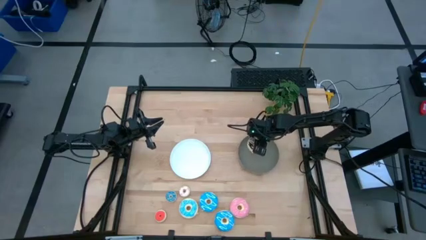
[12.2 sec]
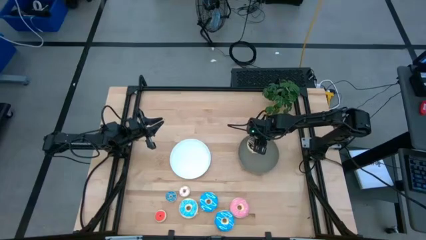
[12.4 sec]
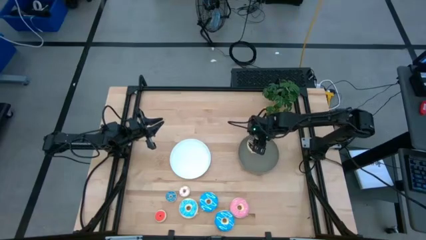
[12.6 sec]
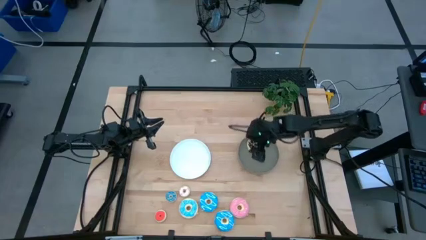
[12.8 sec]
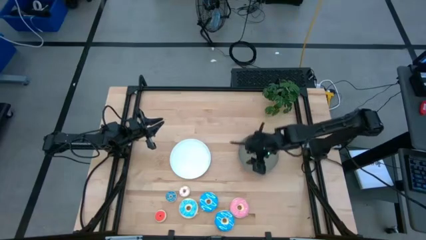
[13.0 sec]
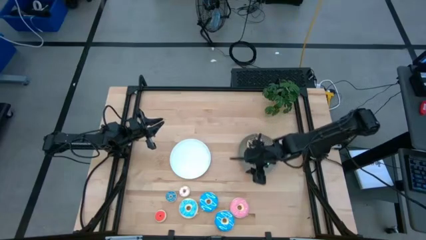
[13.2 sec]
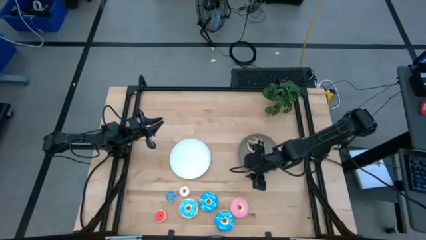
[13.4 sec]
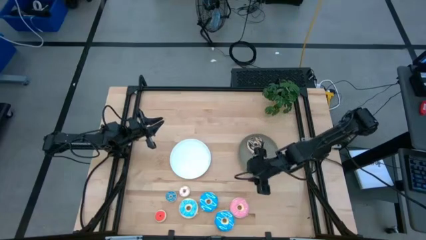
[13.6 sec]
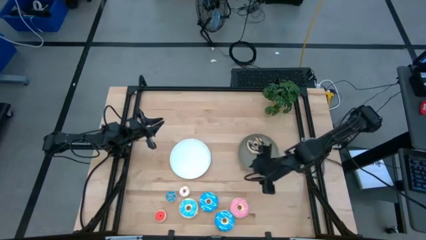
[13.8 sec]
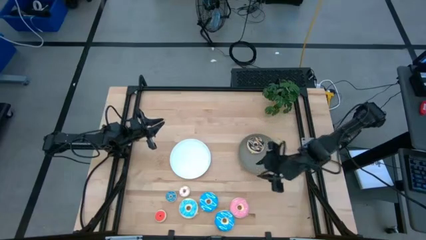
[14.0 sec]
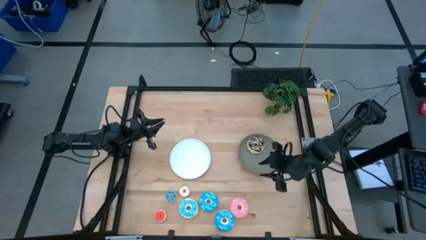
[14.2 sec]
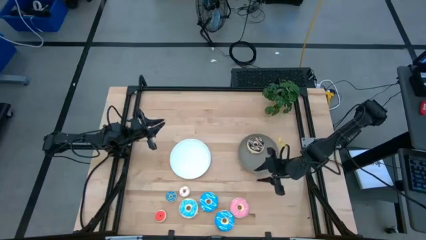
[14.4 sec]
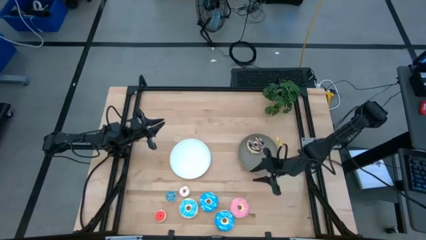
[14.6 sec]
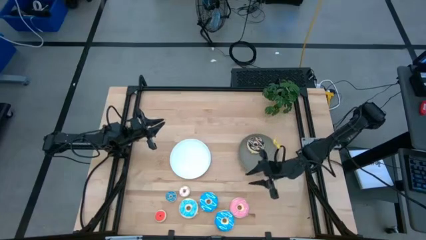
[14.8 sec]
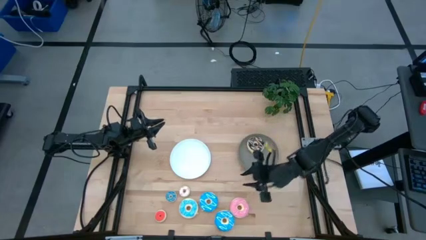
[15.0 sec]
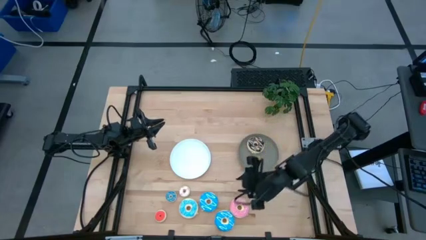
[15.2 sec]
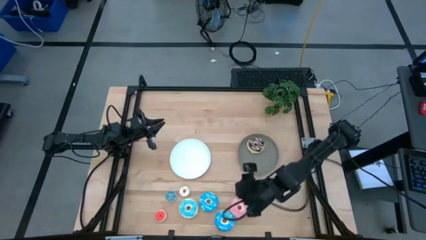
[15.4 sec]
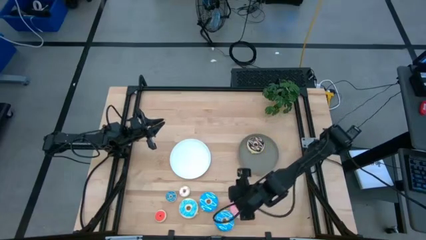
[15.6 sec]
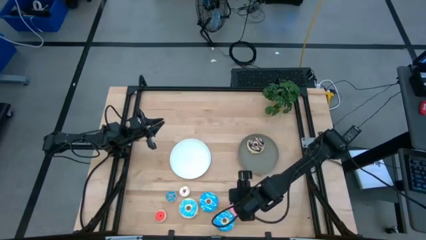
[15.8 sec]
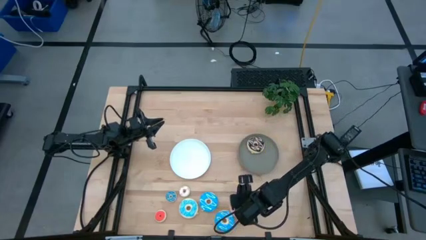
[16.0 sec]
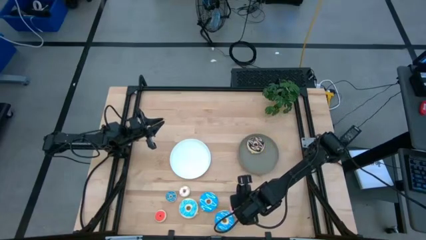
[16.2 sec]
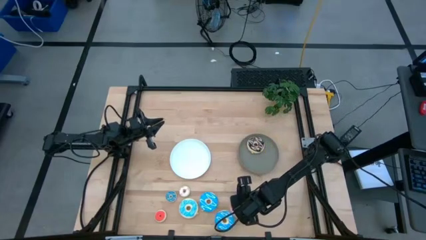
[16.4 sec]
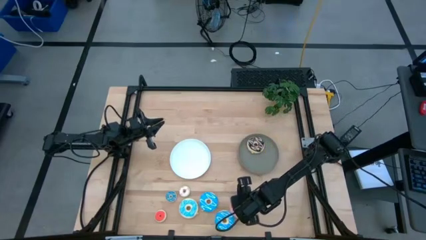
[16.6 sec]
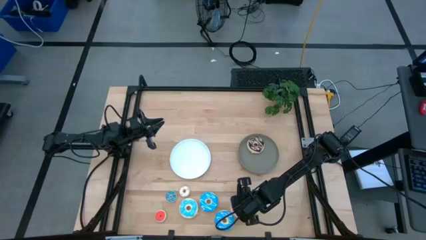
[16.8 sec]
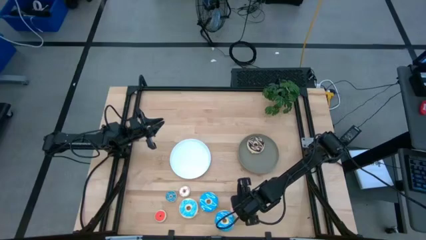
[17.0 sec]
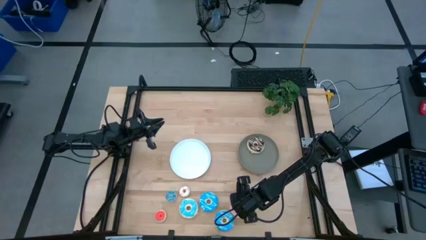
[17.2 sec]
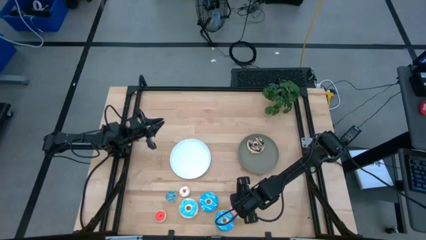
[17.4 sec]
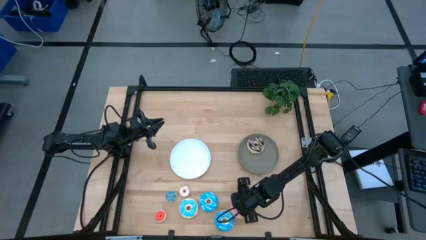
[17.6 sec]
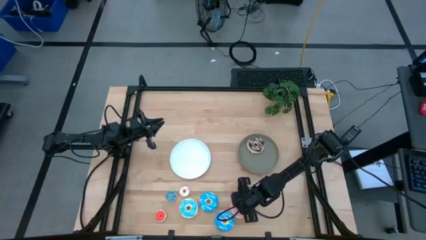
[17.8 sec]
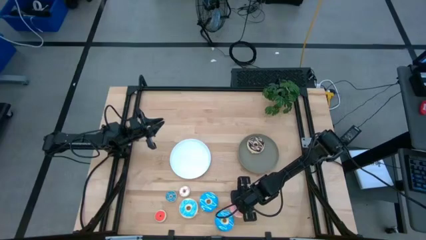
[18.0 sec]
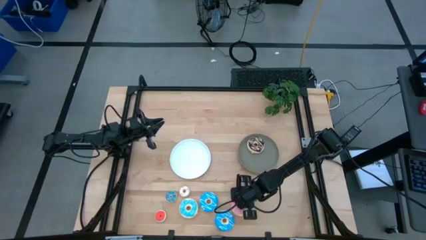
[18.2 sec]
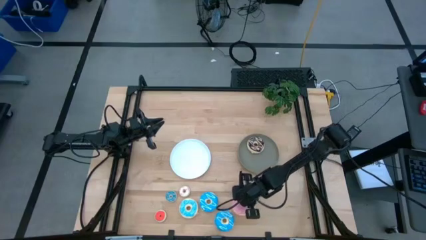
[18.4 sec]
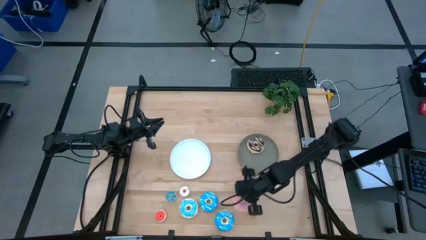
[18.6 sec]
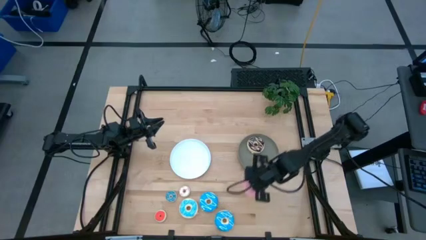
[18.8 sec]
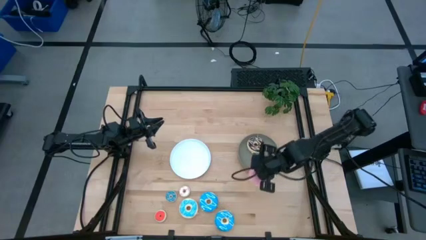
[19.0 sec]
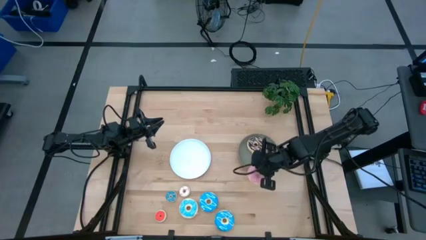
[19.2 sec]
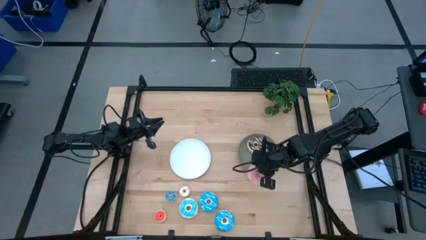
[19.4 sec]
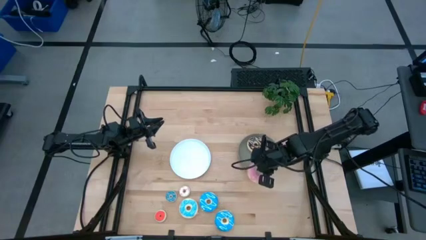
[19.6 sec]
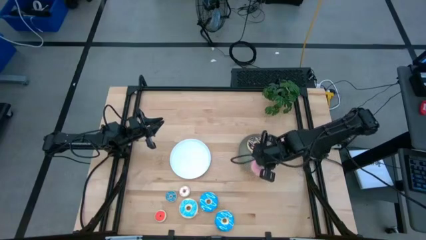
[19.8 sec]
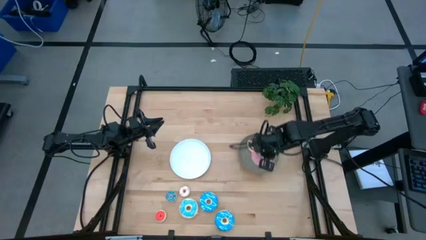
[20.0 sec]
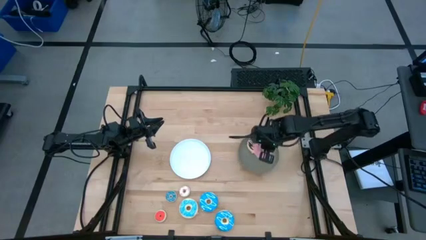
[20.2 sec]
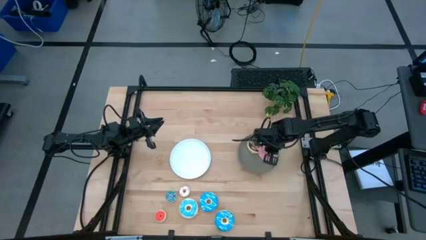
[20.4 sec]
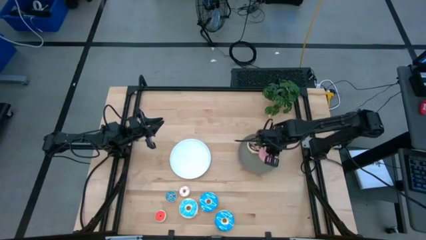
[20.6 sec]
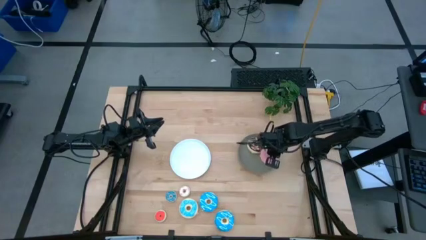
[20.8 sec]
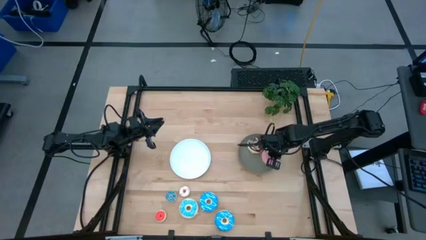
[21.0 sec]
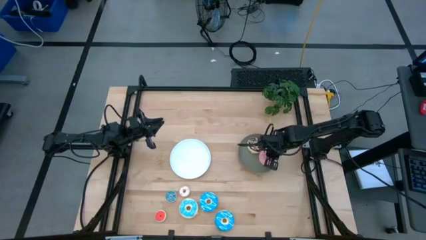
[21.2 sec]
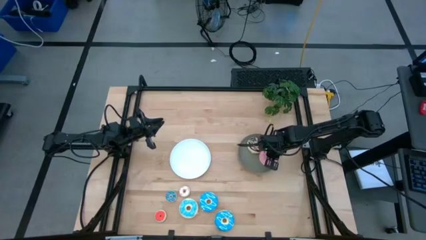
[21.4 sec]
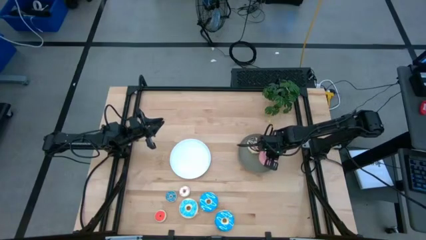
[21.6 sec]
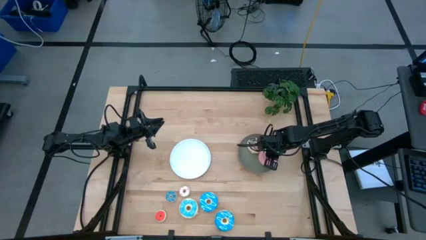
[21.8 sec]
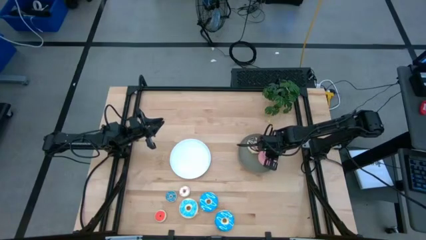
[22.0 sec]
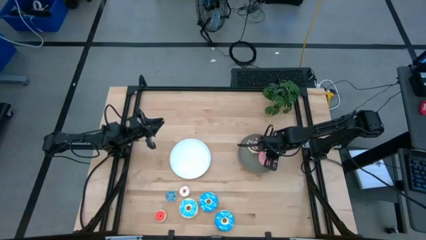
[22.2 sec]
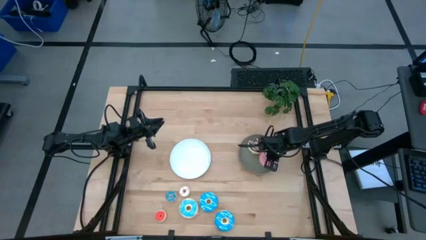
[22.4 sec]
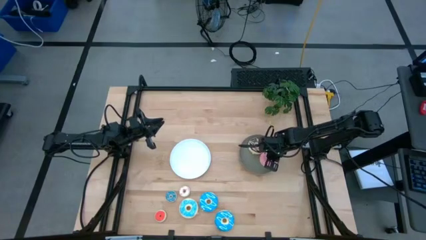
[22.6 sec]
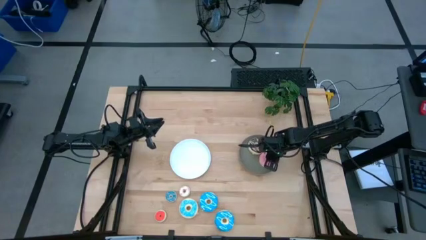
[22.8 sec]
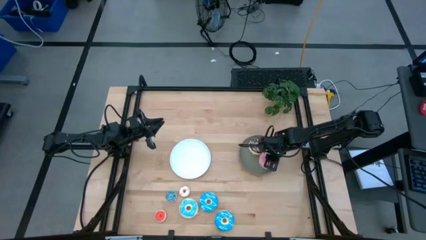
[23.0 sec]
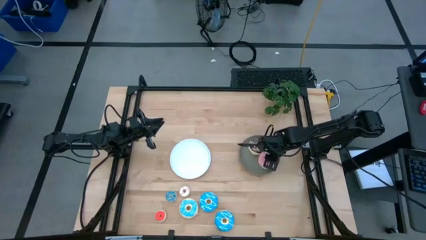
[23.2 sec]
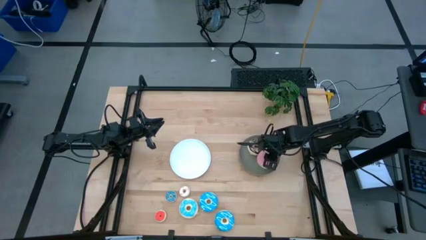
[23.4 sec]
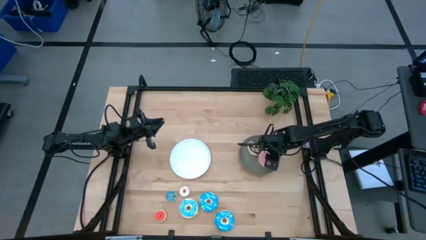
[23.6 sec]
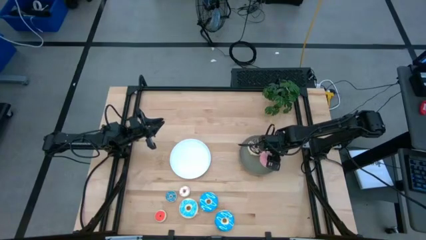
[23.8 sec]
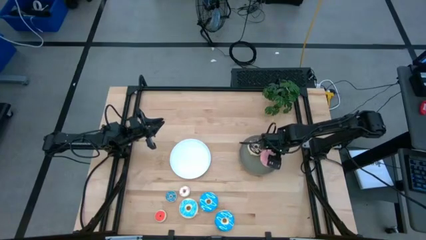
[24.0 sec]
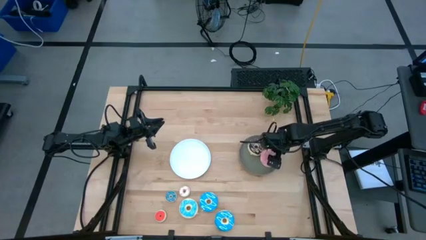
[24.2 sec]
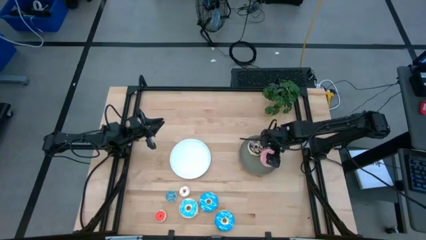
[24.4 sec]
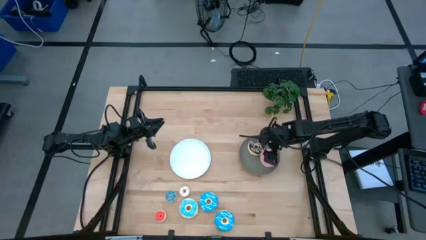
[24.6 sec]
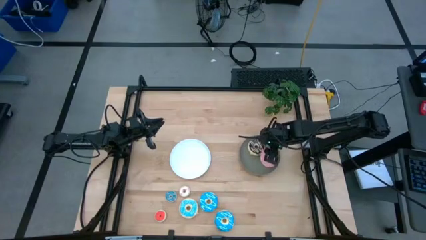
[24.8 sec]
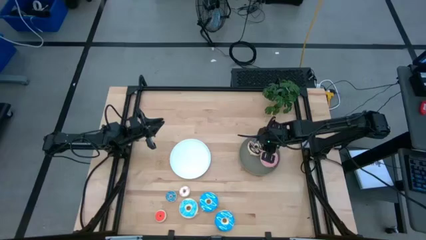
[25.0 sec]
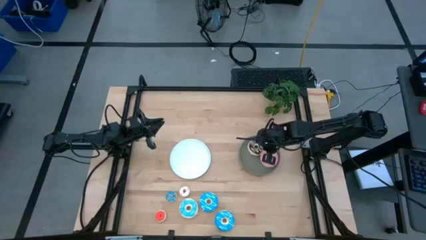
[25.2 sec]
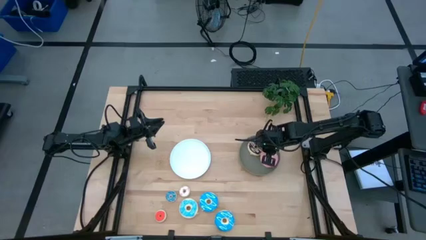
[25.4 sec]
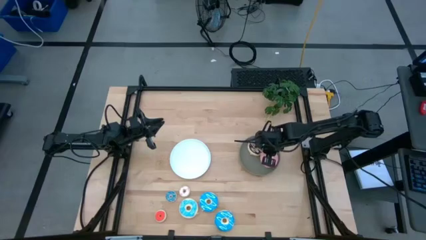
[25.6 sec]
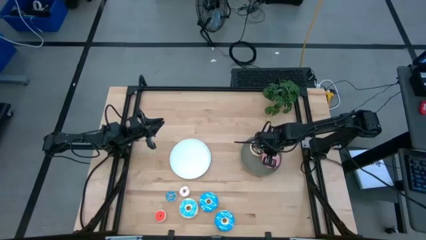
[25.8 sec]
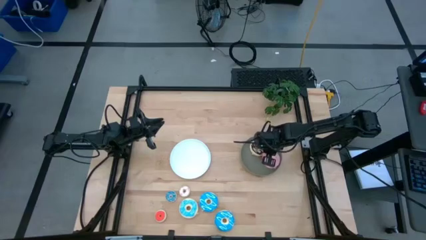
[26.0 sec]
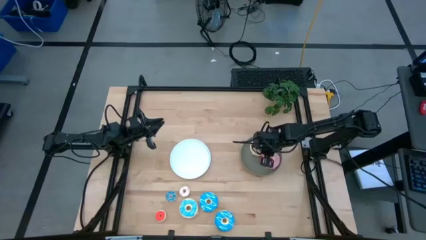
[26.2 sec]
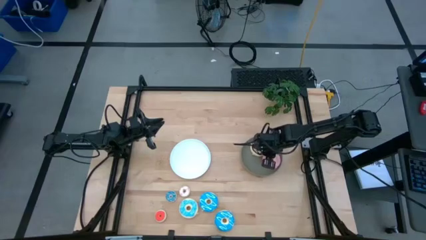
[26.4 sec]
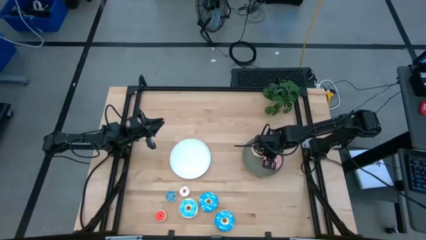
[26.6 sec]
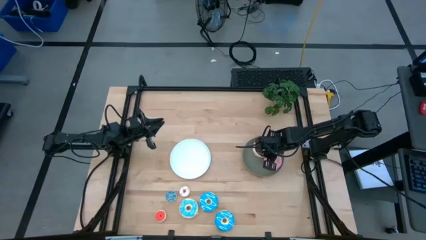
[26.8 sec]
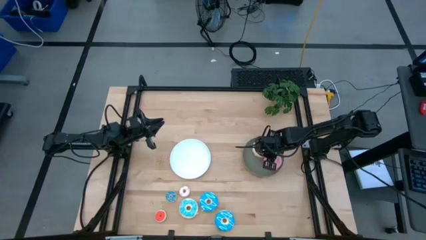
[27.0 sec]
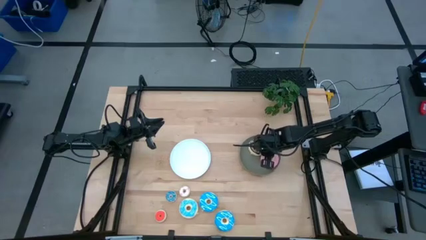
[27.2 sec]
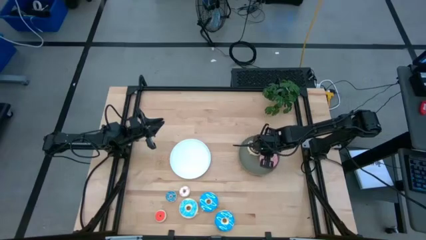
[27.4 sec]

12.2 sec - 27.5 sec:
Task: Pick & Place donuts
Put the large pink donut on the gray plate

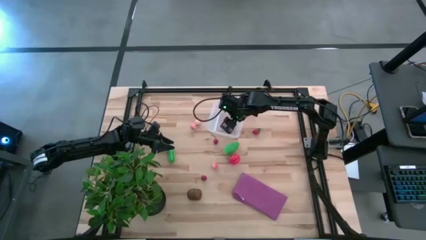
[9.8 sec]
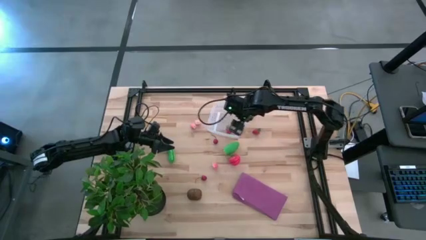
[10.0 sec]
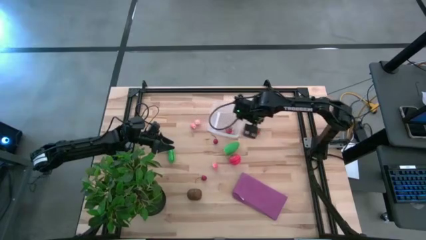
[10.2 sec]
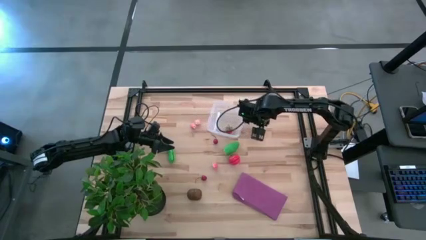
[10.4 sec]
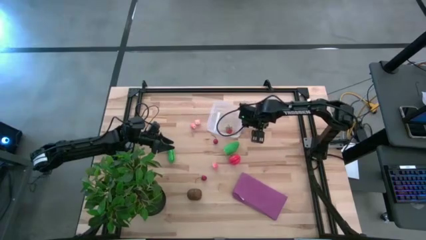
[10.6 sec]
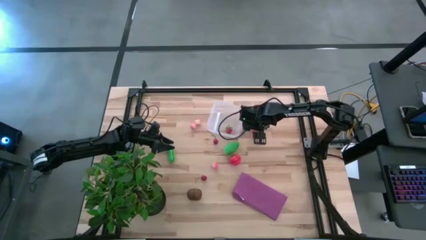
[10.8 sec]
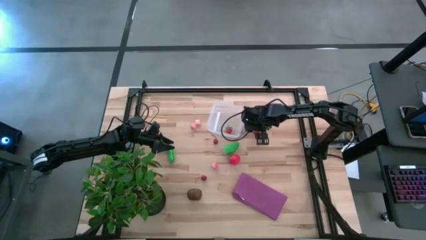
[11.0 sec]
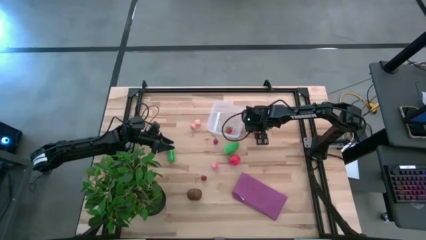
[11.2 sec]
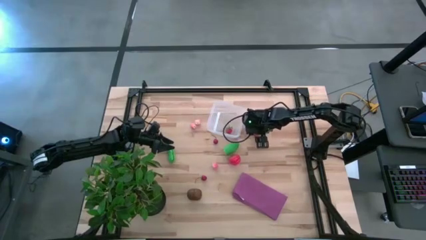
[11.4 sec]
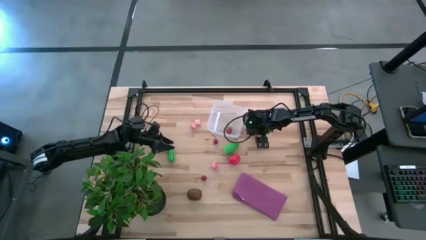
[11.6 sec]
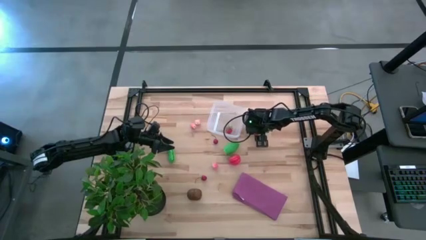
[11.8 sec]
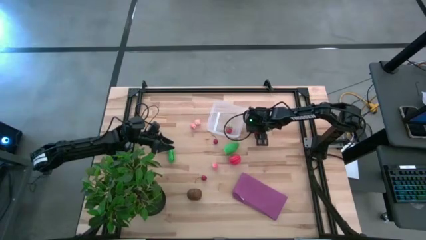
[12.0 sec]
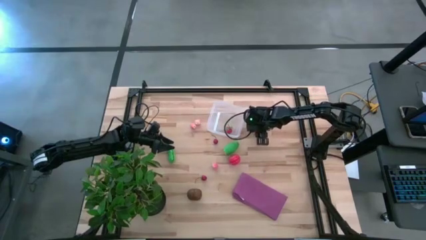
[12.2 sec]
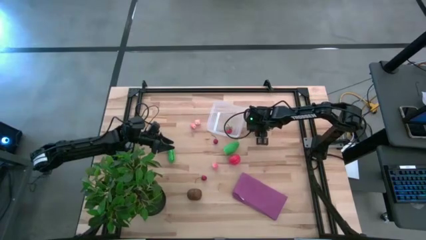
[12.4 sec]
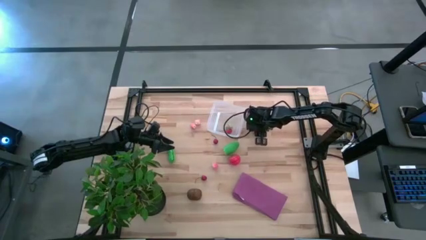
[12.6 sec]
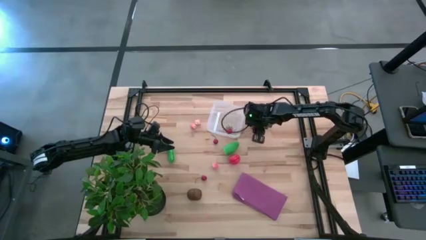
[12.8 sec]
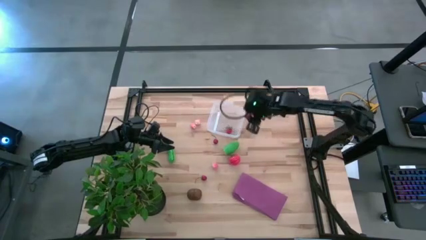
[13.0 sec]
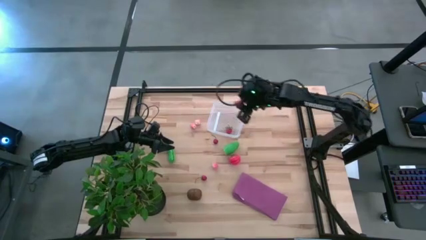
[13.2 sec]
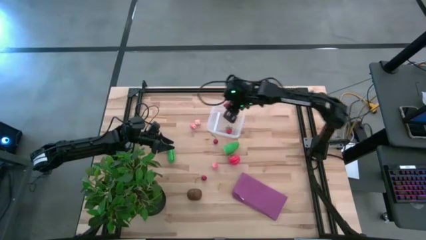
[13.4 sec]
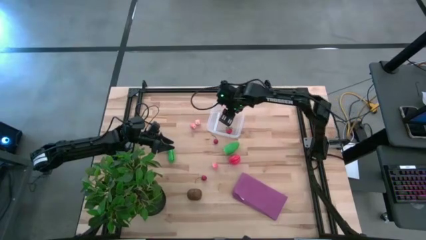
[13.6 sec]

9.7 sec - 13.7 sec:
Task: Pick and placing Produce into tupperware
Put the strawberry in the transparent bin
